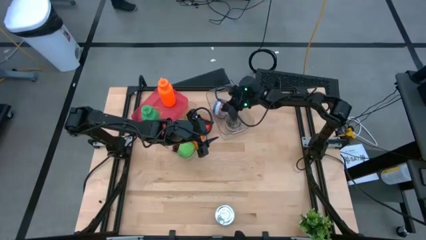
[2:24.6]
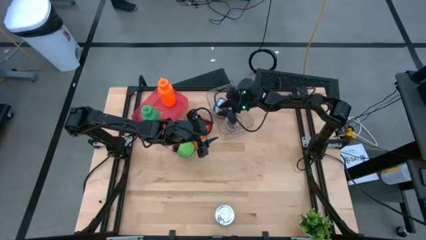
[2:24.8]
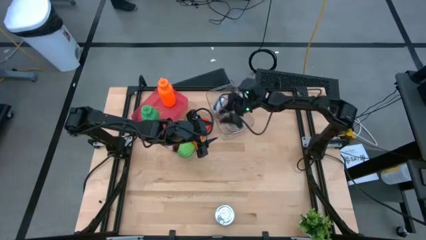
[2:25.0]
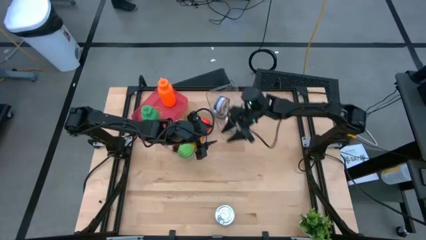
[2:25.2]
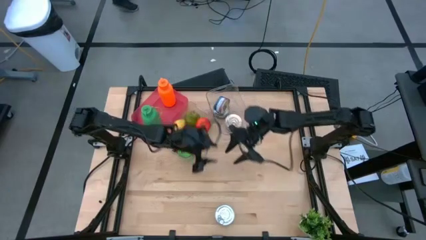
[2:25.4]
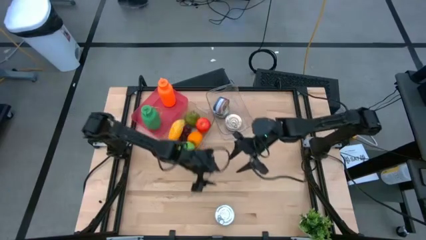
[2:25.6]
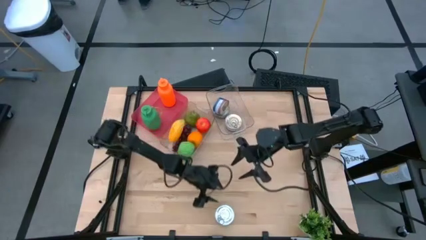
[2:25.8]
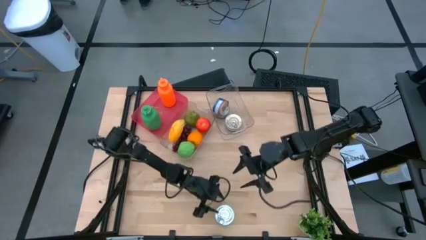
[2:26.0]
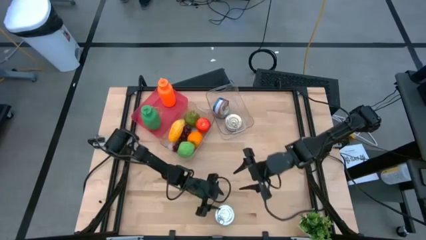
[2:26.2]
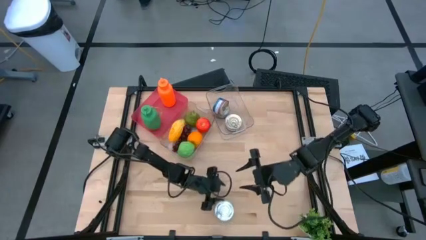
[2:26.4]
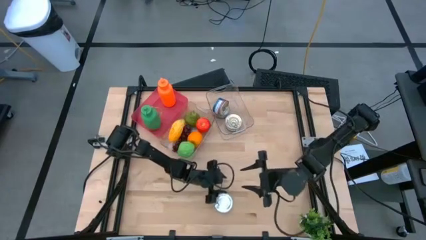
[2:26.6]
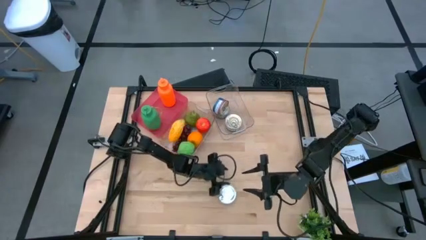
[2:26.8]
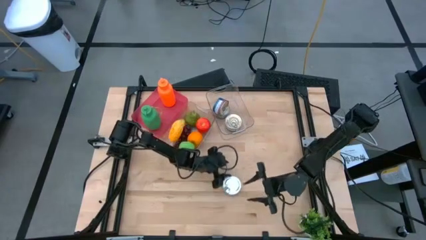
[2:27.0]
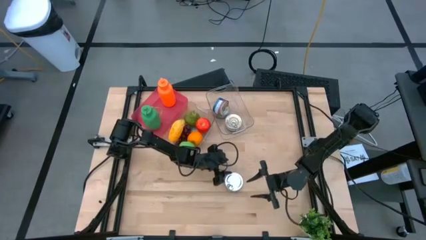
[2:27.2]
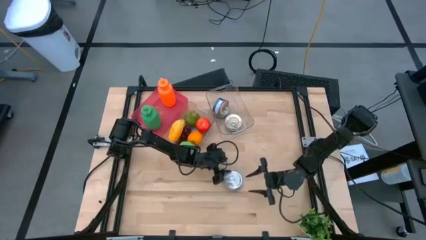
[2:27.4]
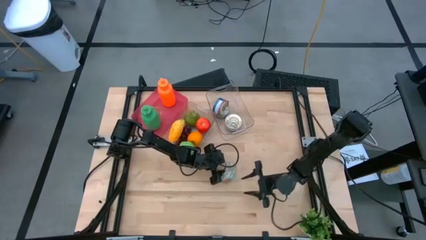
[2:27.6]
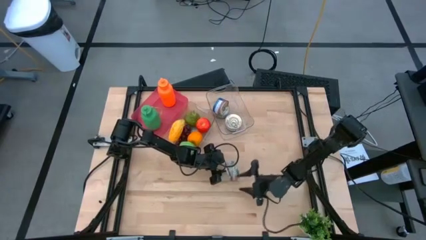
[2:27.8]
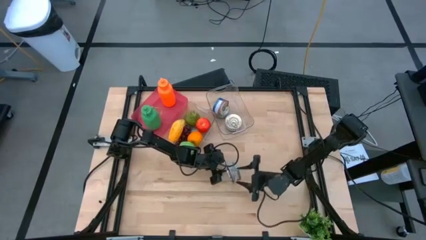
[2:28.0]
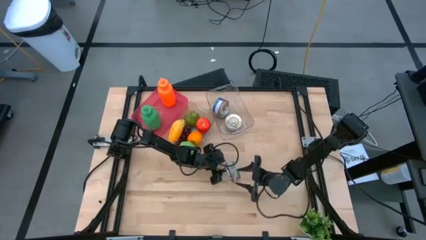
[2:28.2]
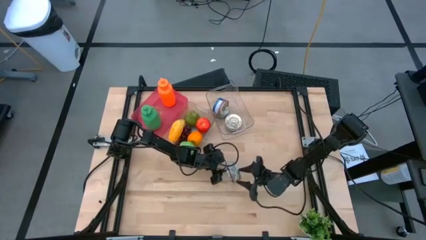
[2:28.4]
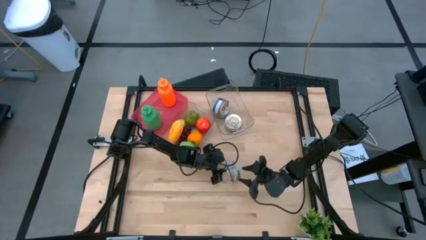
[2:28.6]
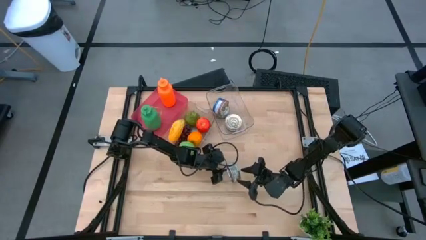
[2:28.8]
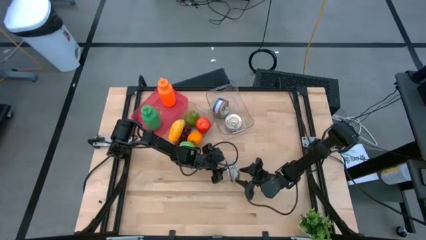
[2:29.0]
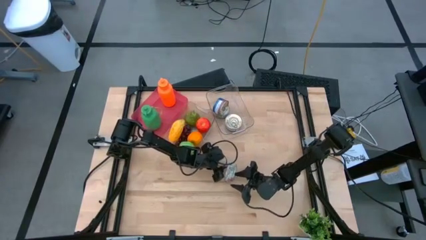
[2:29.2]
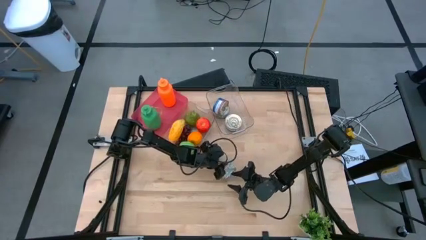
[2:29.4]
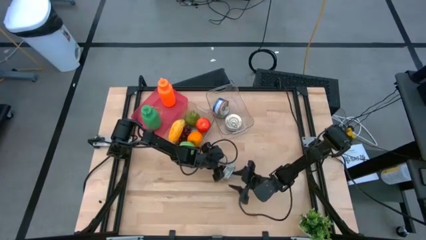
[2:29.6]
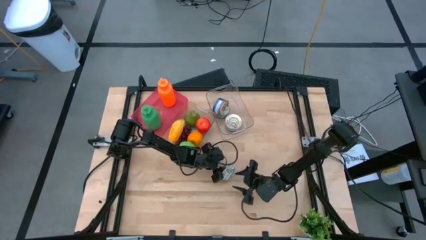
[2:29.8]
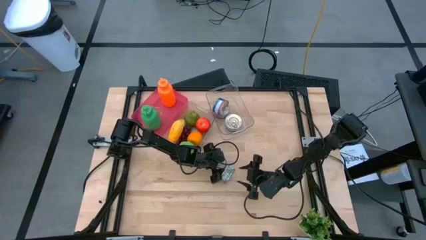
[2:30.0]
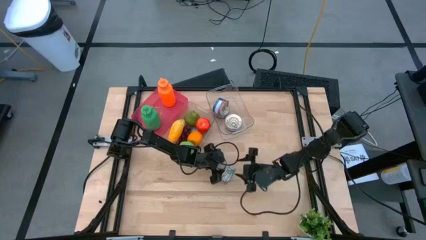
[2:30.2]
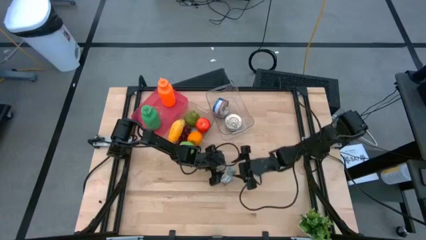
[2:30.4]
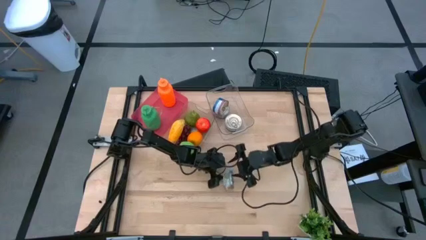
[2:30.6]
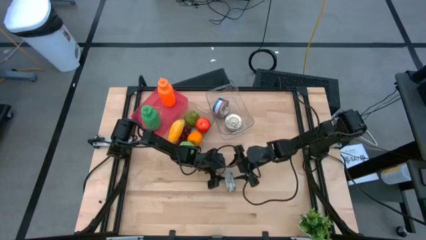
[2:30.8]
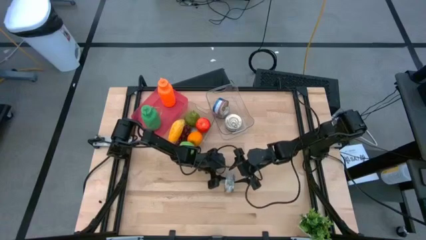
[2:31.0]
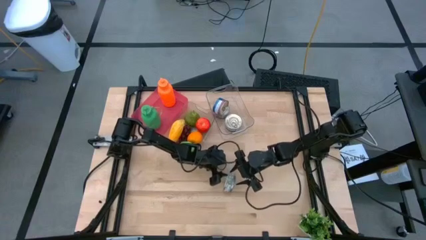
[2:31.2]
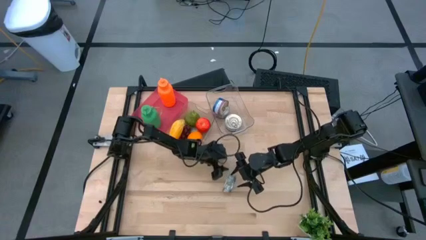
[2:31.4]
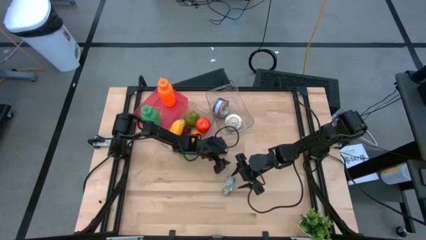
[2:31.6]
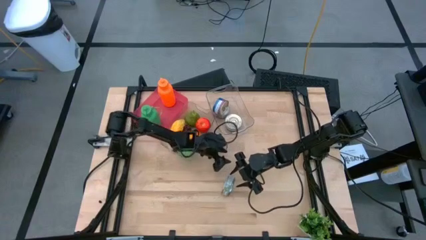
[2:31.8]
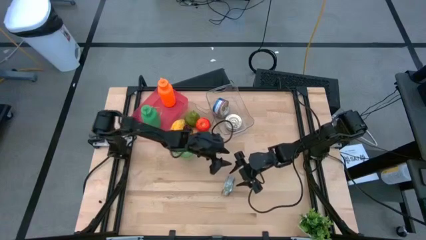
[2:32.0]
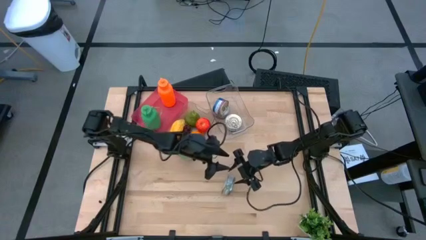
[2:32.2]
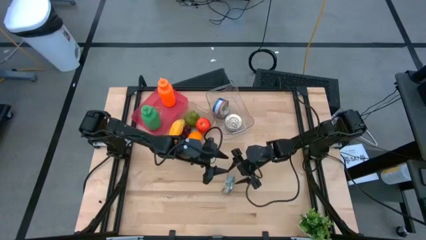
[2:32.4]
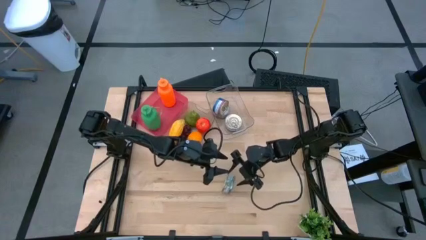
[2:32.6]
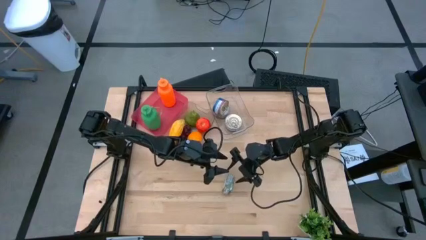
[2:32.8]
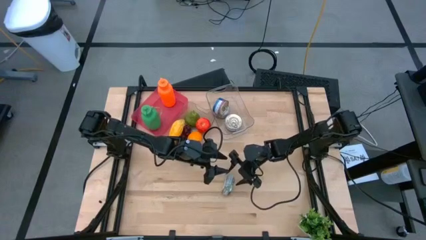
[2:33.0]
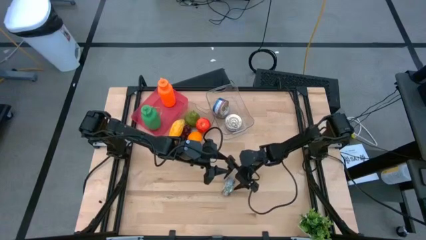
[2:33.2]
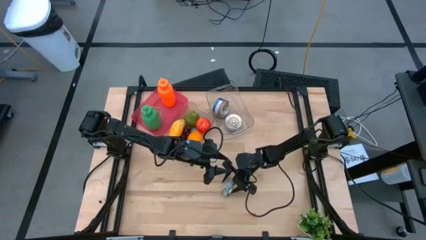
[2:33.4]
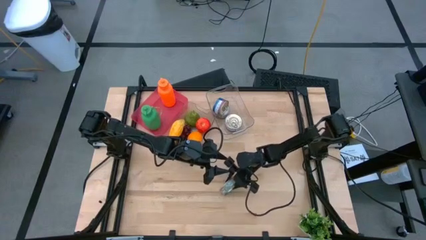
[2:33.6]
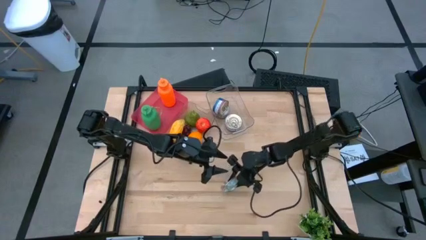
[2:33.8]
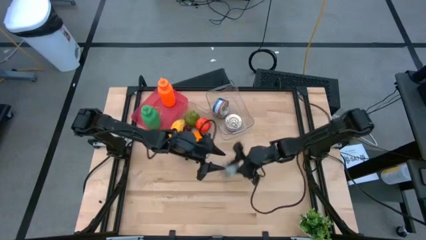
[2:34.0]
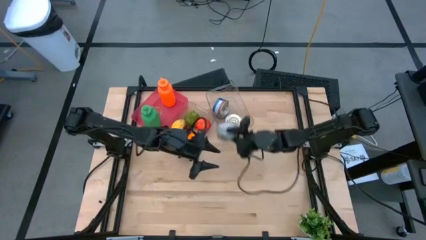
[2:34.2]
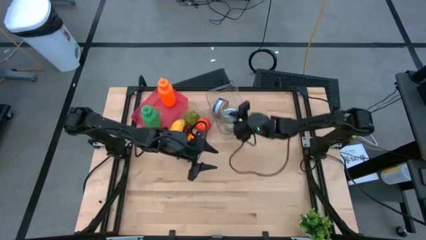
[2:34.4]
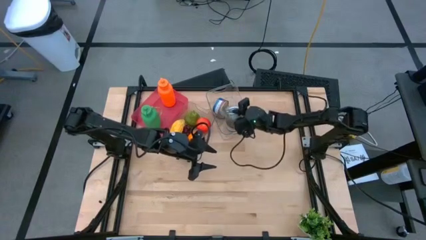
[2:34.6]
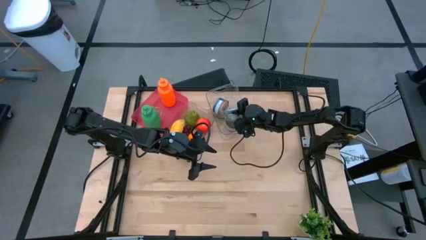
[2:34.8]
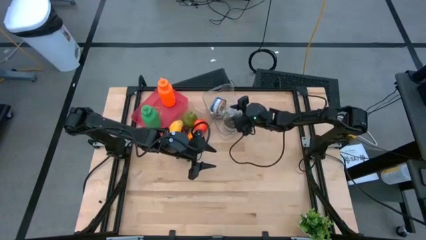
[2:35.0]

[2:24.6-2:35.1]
Task: Pick & Place Food Item
Put the green tuna can into the right transparent bin

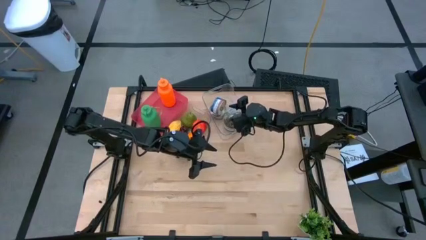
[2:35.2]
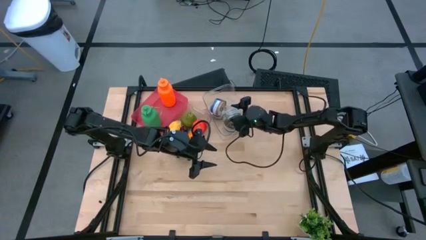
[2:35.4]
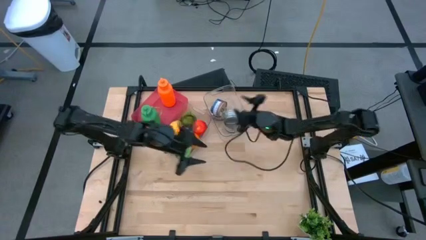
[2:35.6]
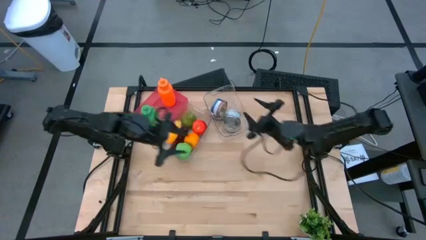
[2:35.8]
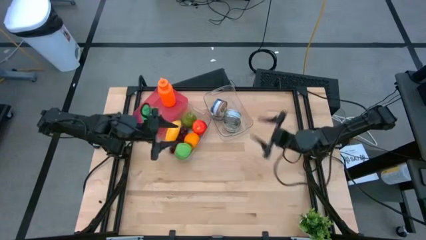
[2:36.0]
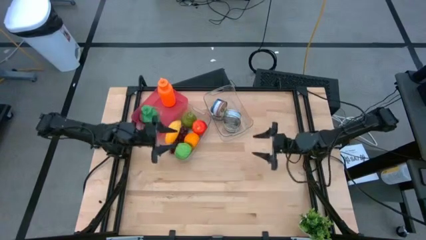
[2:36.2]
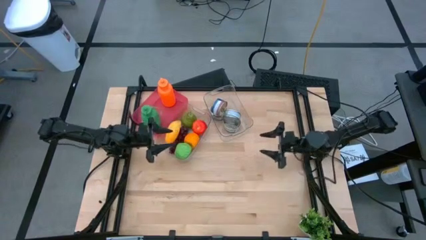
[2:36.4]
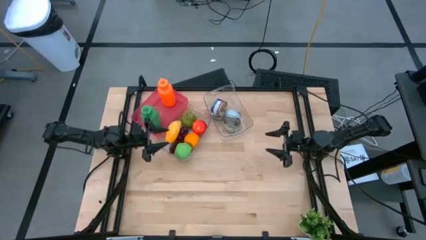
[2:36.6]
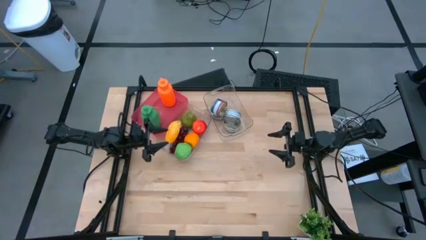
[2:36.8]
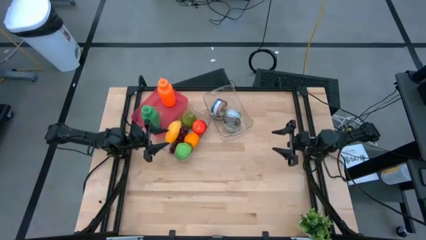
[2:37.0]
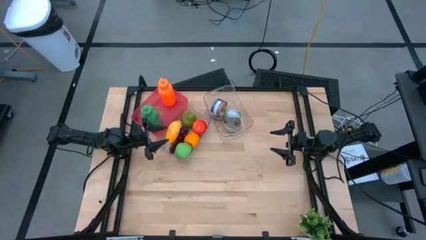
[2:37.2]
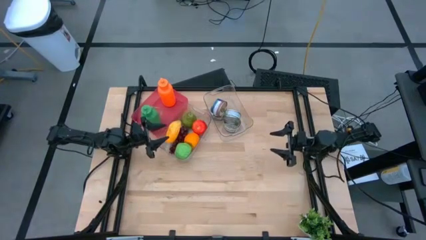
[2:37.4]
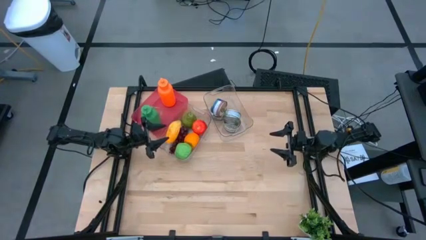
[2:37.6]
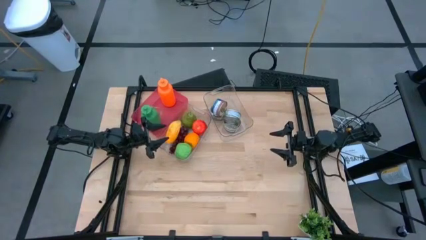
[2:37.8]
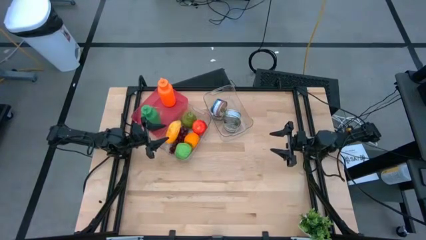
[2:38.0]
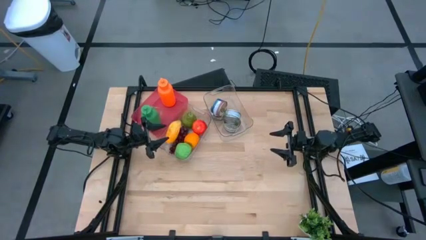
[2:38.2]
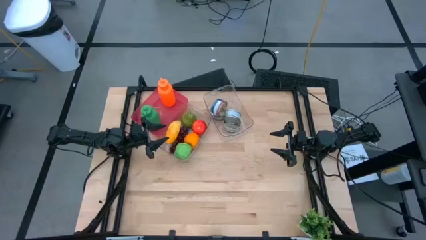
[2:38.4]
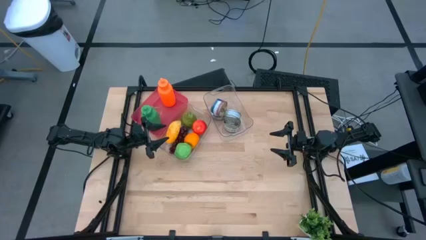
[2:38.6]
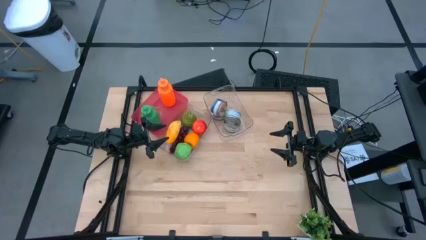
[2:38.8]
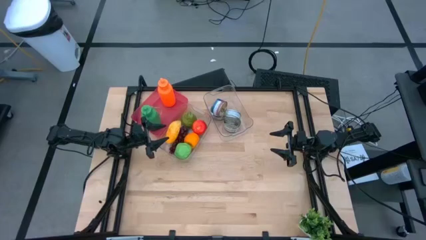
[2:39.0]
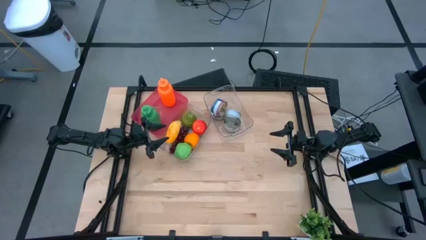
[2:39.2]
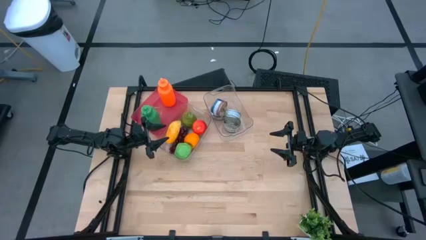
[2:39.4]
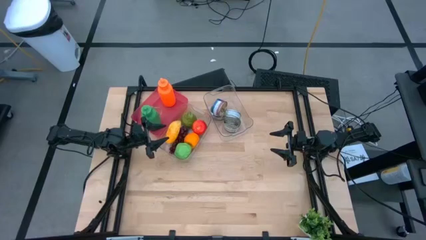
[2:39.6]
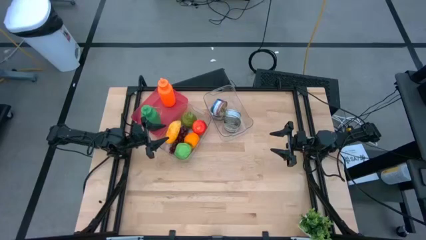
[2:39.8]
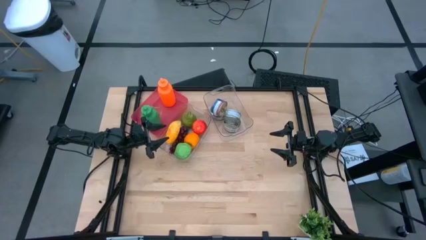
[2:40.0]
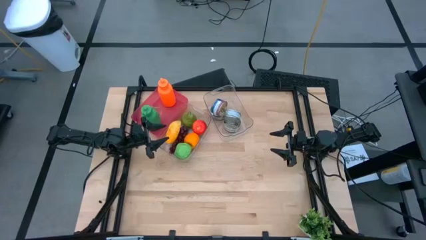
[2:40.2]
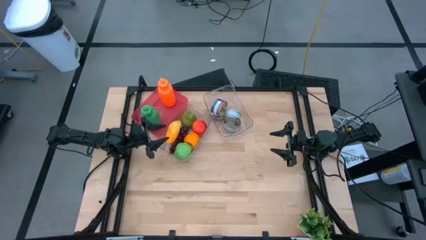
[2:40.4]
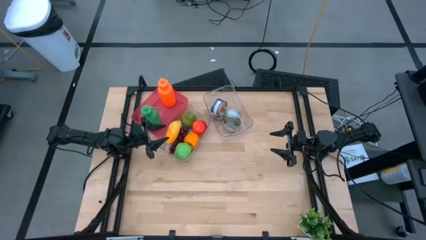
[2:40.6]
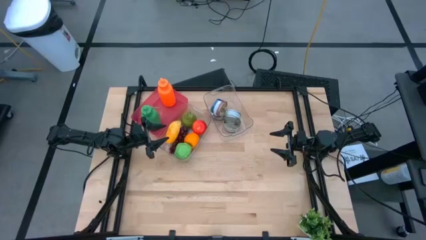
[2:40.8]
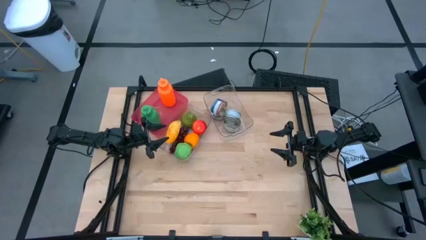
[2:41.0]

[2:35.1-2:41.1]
Return to Home Position
